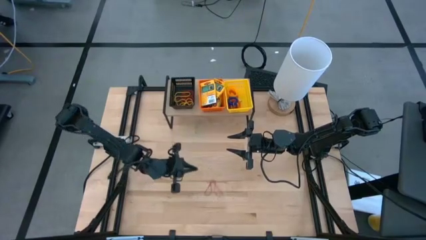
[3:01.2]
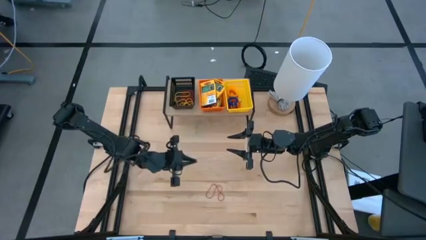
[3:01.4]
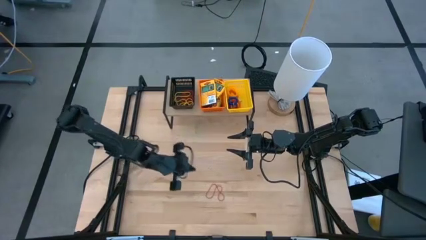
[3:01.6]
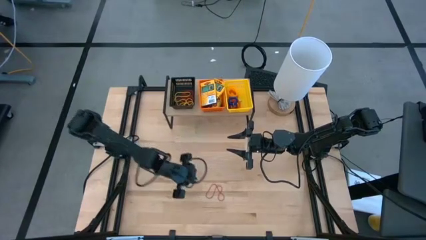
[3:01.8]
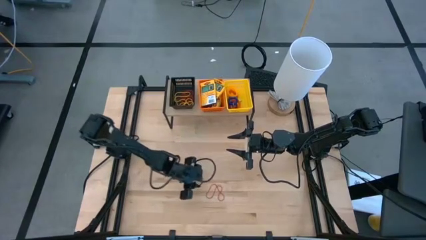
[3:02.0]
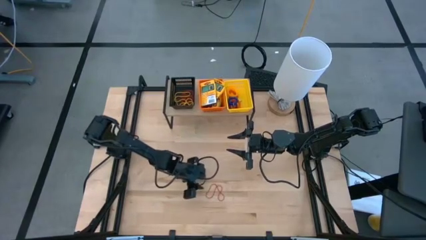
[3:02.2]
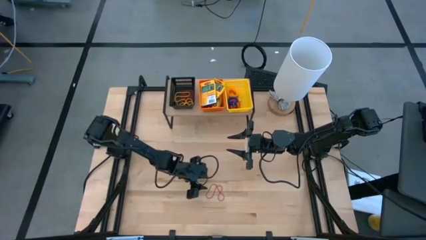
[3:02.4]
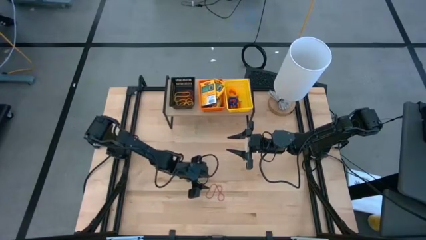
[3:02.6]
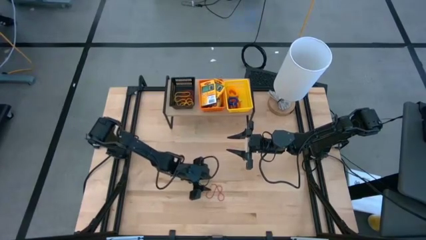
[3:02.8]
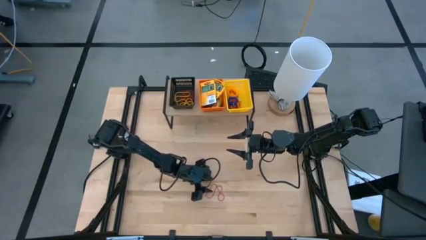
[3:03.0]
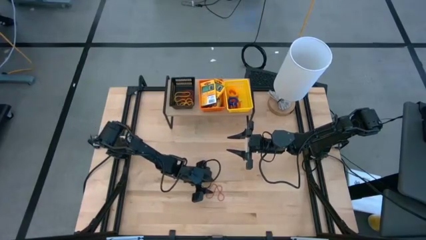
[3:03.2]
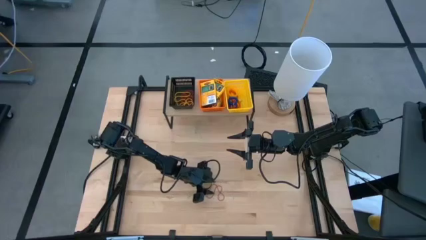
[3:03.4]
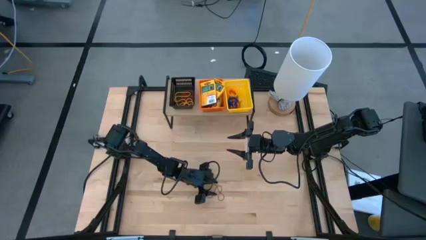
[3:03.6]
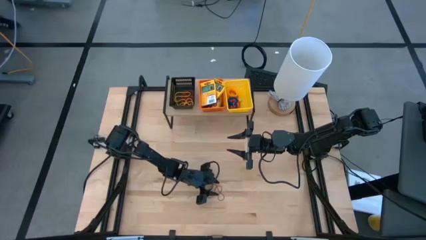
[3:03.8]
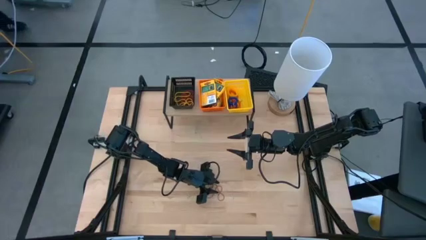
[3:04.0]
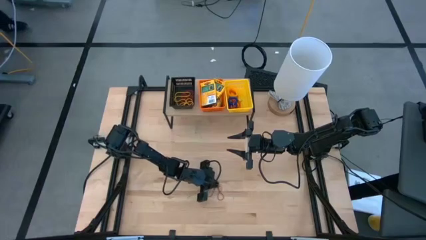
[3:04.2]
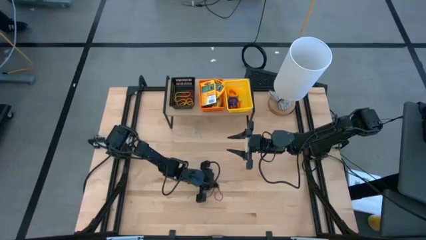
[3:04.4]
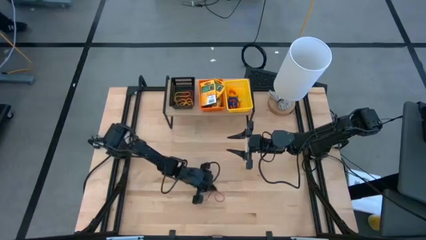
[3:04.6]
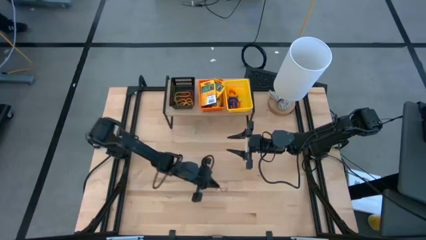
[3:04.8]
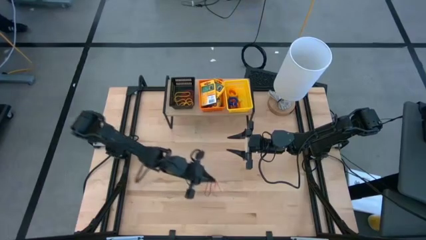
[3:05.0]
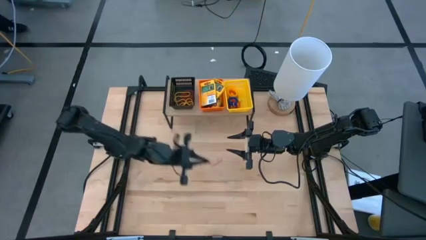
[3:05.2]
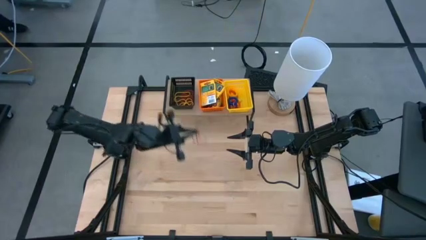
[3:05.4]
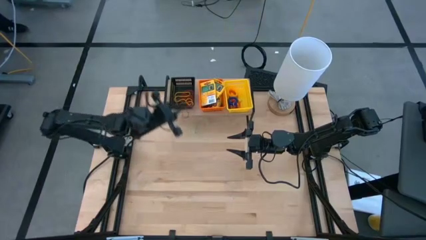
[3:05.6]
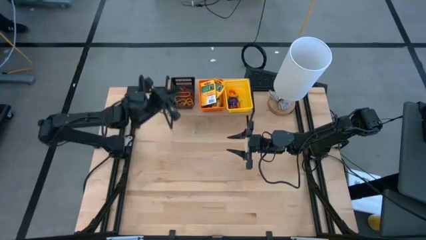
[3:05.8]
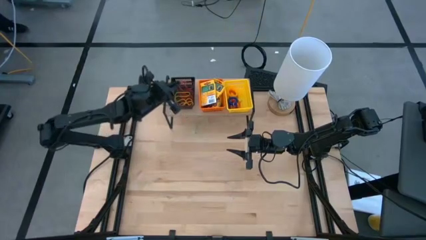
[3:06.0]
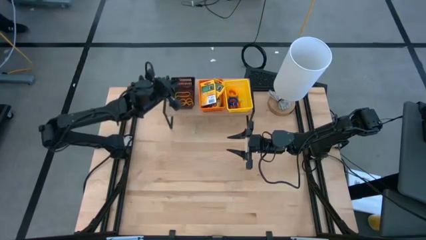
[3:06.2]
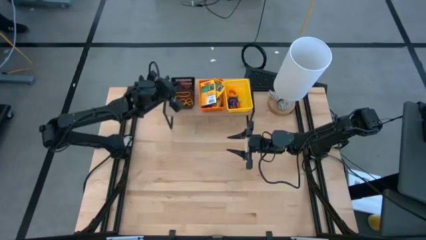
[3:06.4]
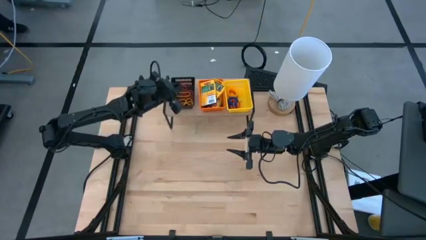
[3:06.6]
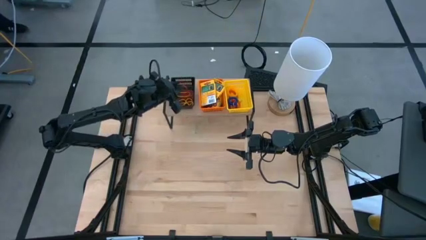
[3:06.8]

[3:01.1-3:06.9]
Task: Pick & Place Office Desk Supplies
Put the red rubberband into the black bin on the shelf

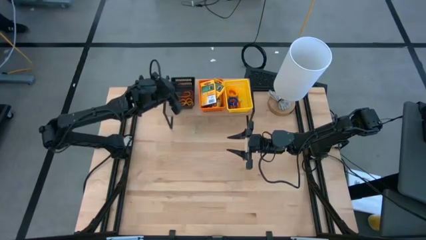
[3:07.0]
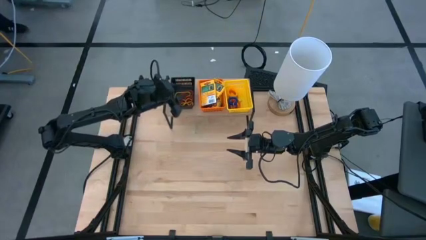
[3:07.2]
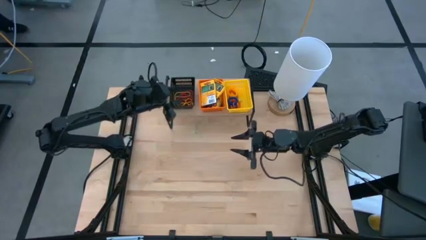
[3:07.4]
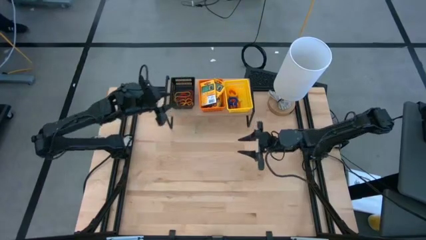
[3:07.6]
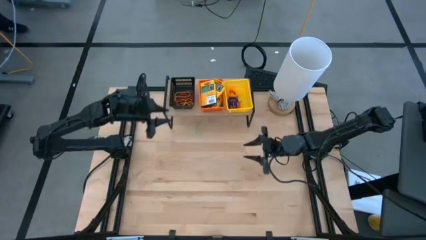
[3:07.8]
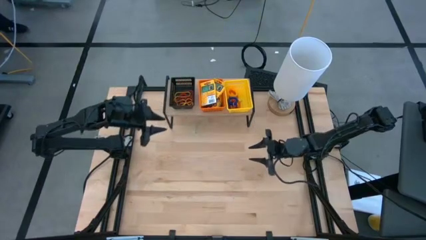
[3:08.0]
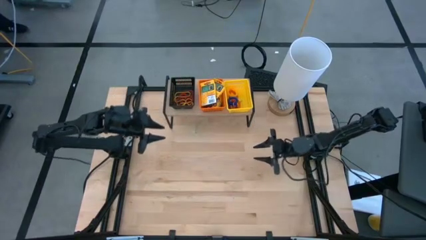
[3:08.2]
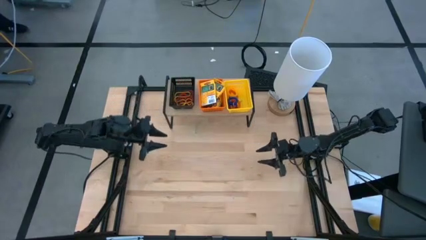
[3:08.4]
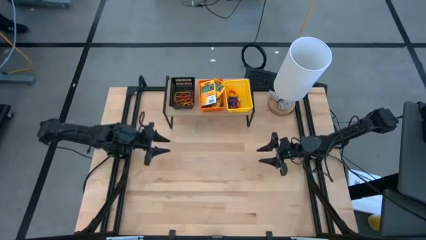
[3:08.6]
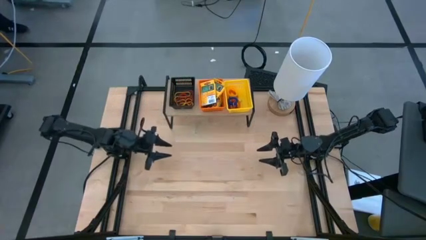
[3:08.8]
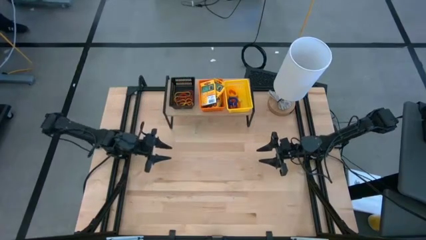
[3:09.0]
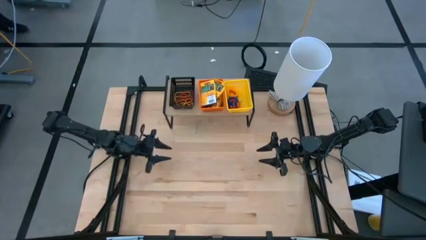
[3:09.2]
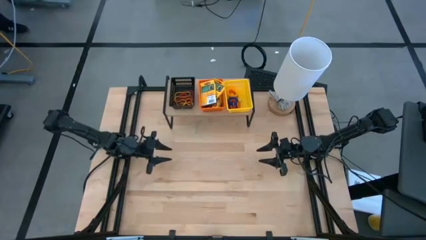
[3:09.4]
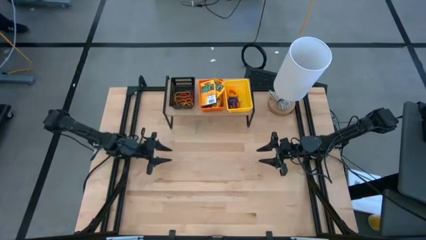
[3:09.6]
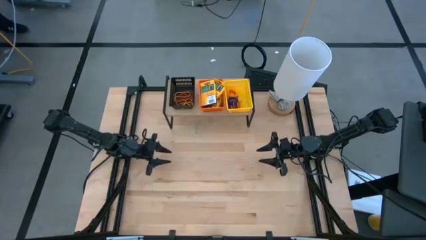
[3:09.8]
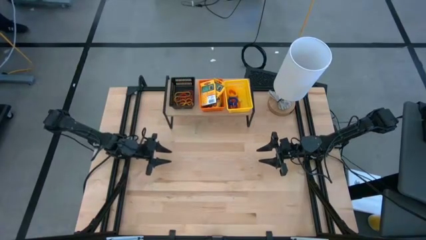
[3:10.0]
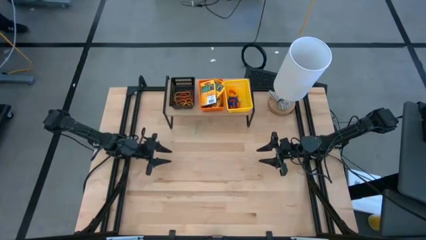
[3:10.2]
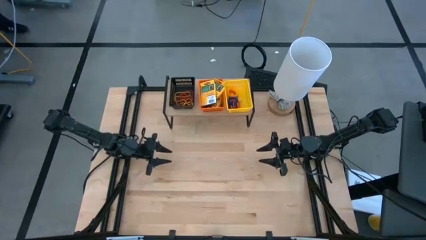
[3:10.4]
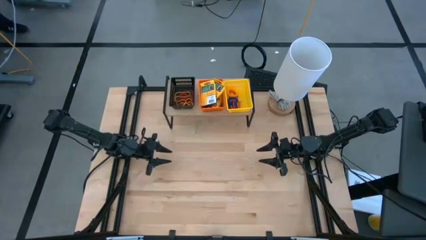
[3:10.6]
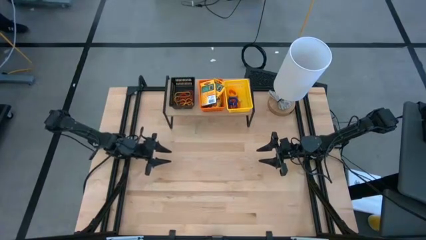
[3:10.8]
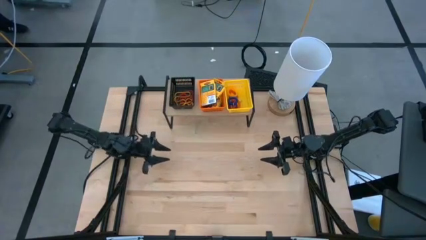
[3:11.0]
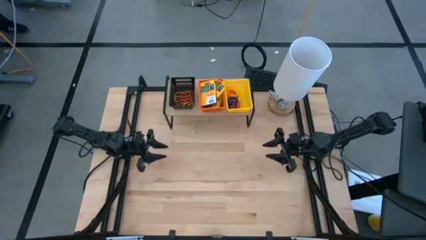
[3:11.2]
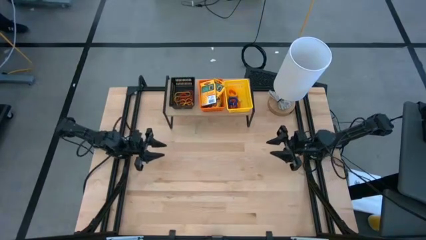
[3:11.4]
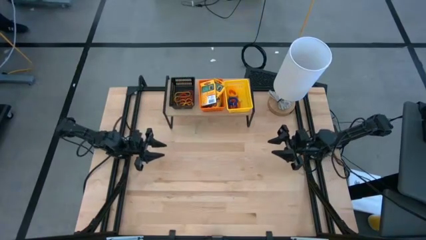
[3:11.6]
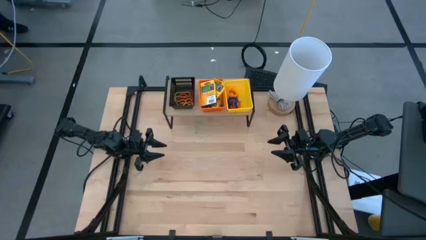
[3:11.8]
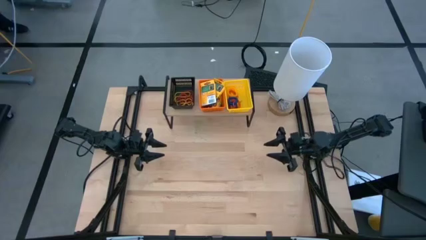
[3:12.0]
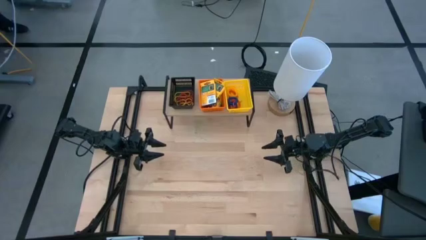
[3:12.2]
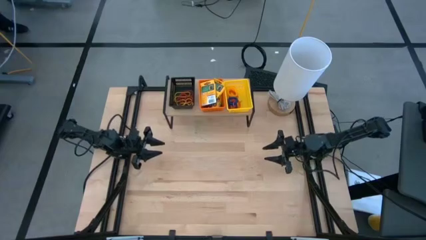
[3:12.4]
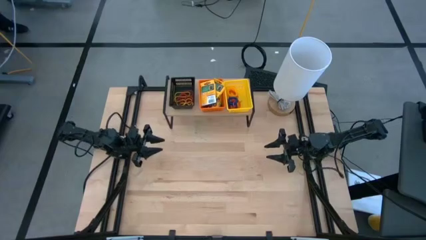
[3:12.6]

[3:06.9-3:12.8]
Return to Home Position
